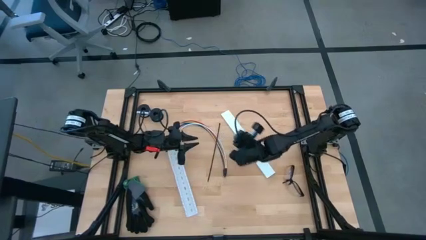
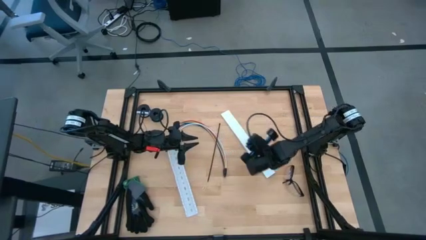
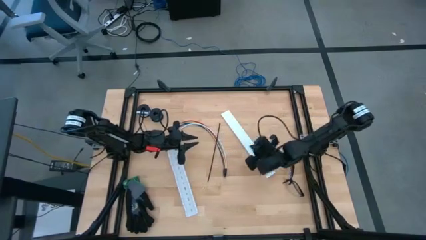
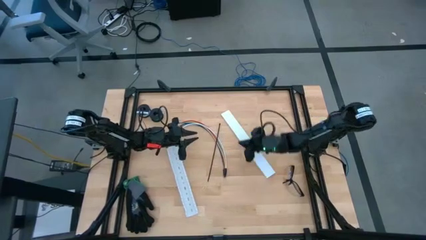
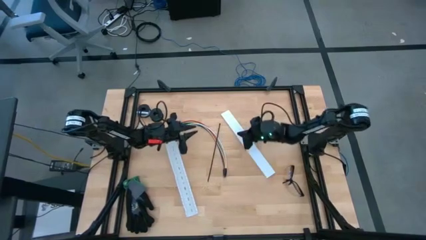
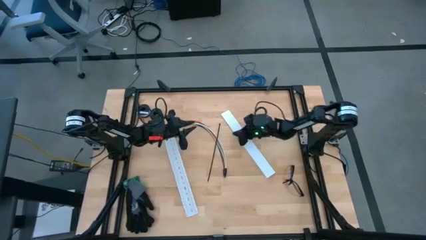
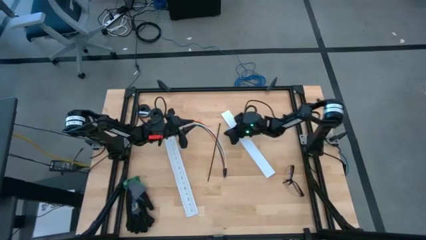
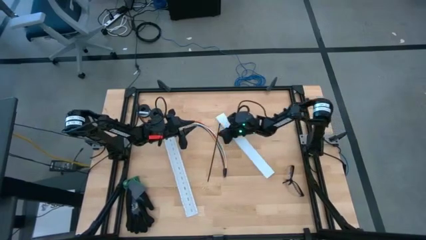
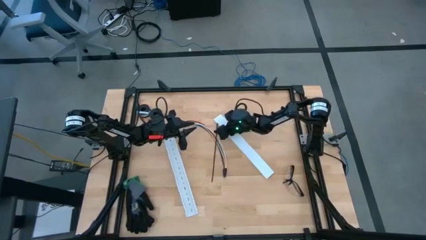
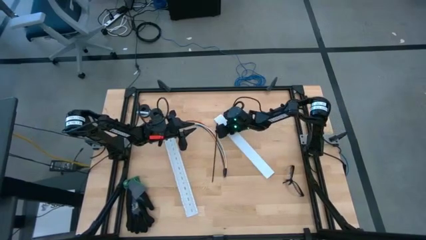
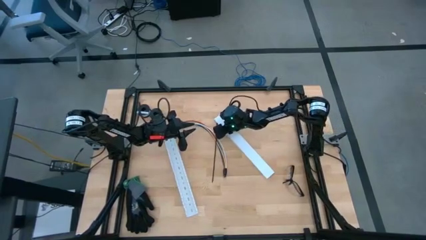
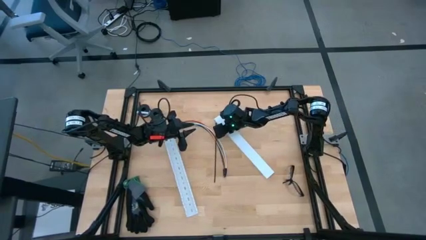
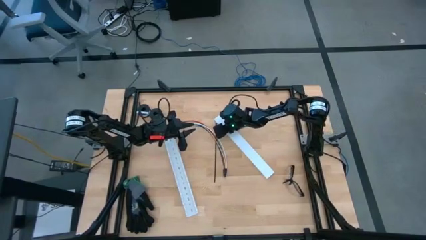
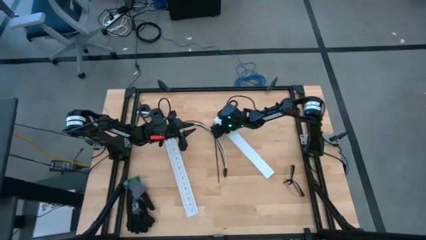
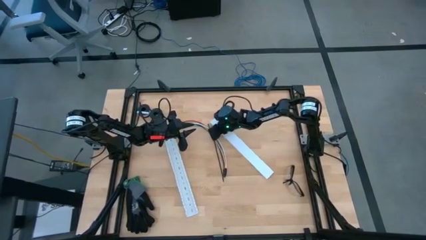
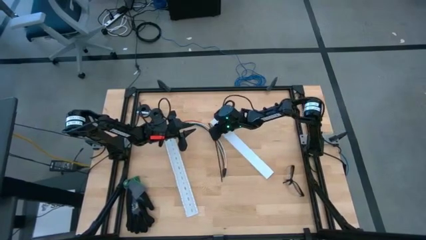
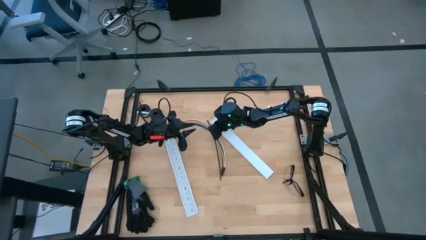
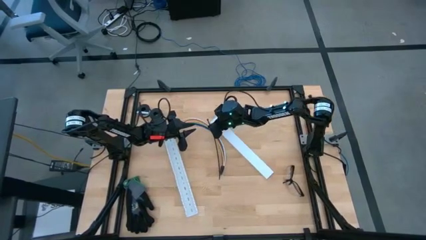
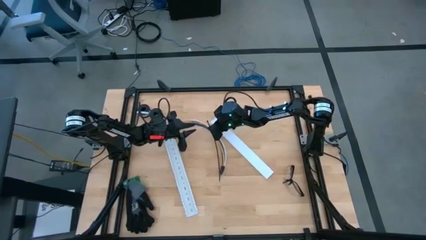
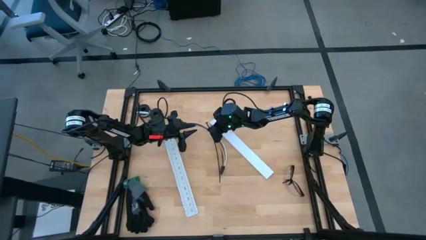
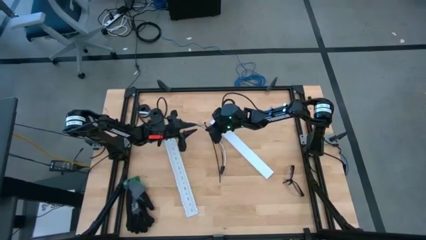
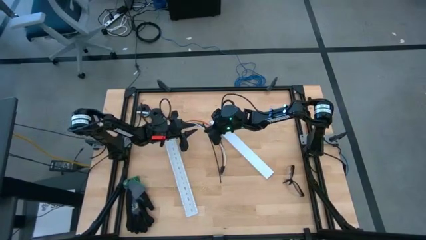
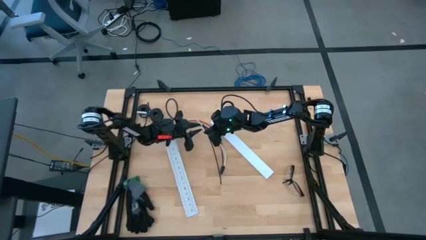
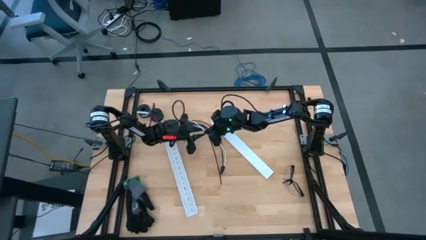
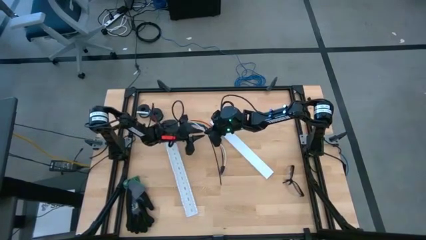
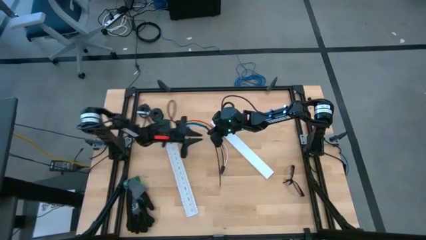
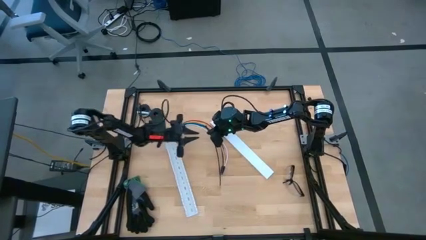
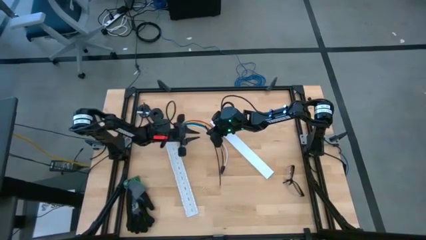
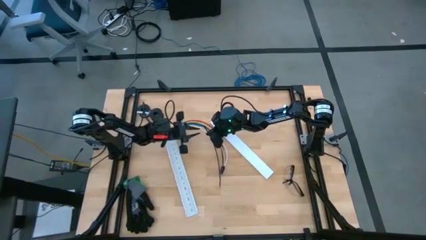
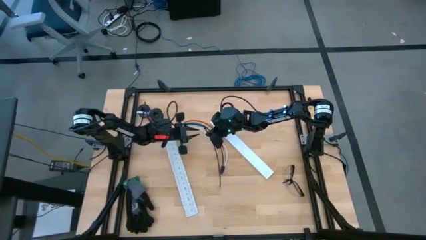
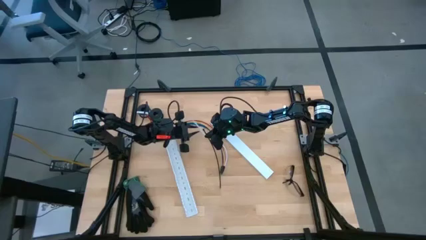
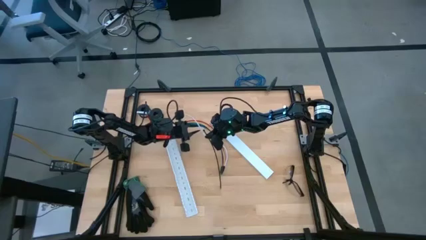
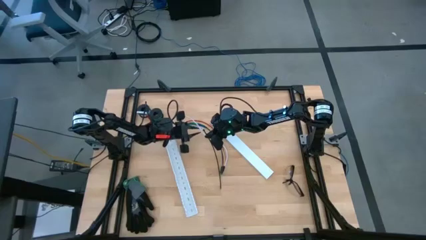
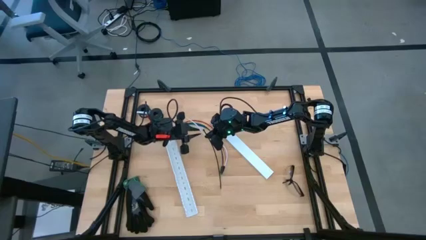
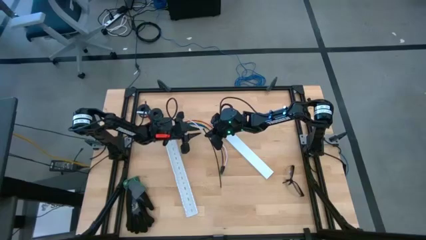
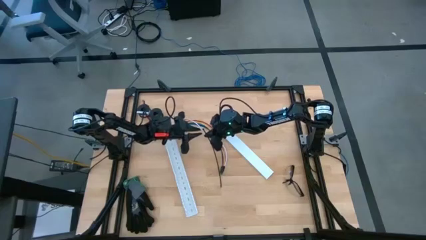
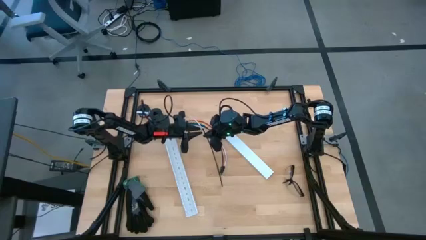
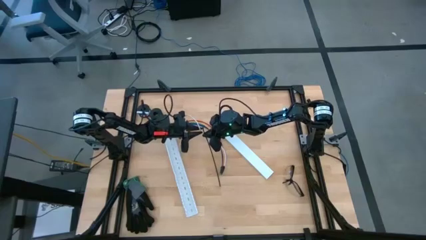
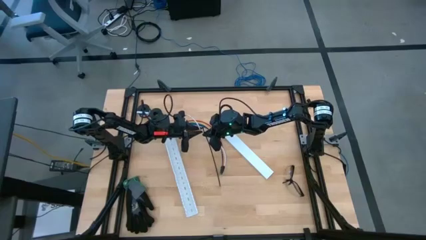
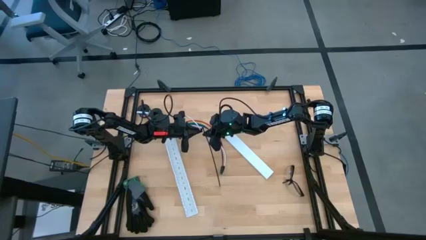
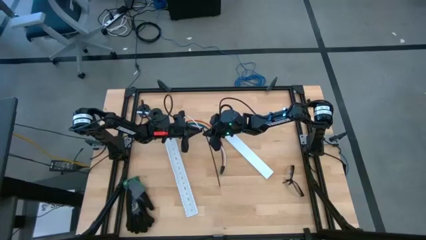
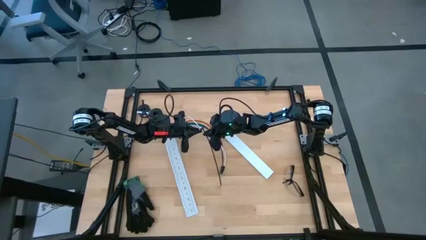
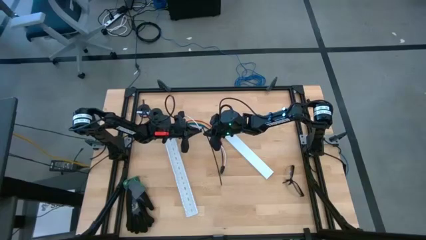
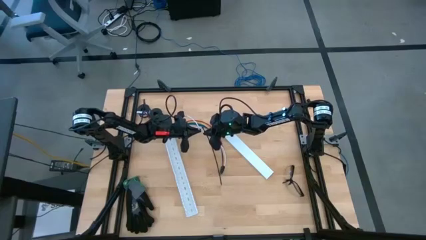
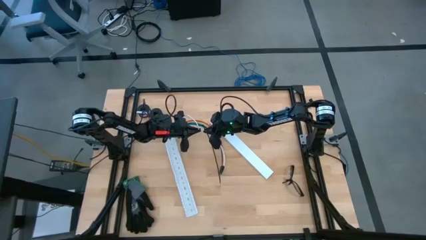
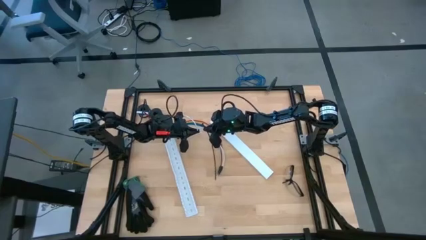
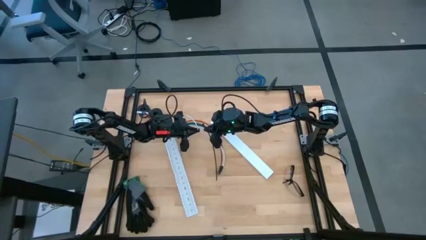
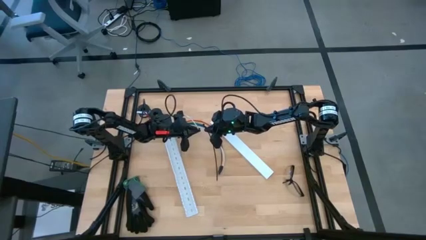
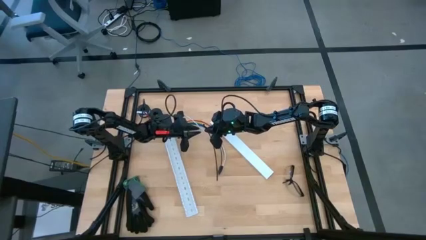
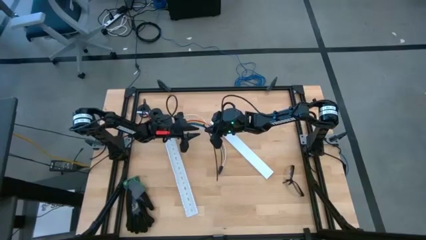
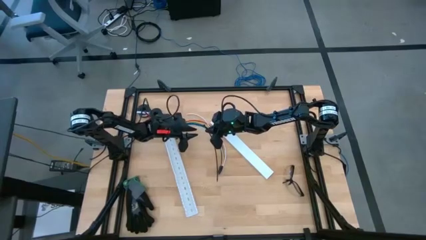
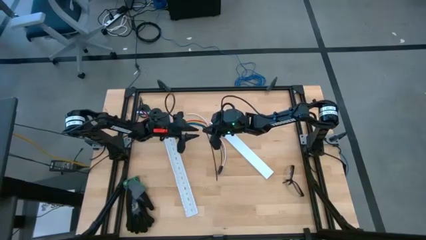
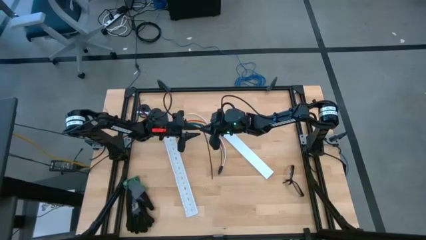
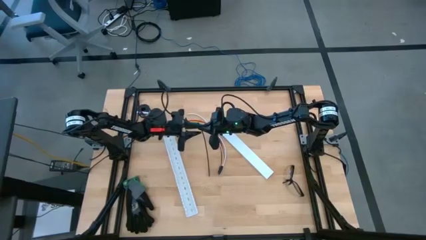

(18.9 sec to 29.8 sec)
Task: Ziptie cables
Wrap the cables together using the black zip tie

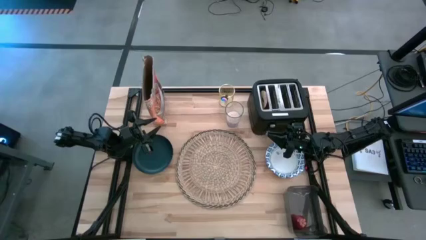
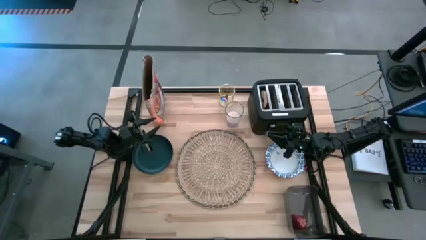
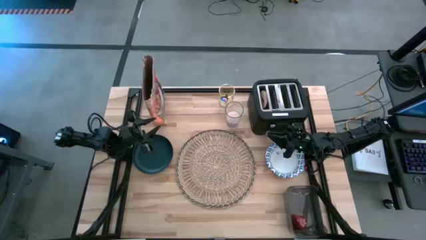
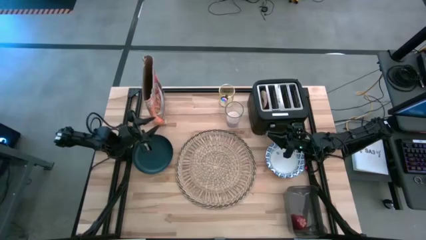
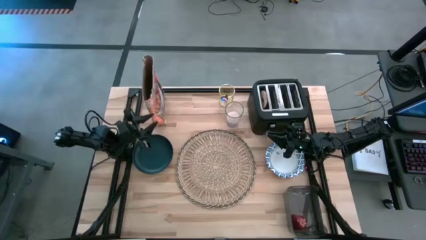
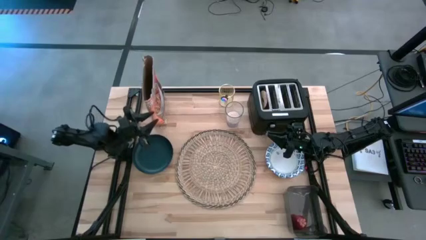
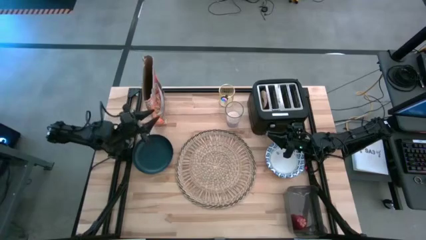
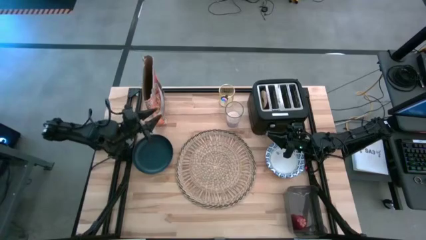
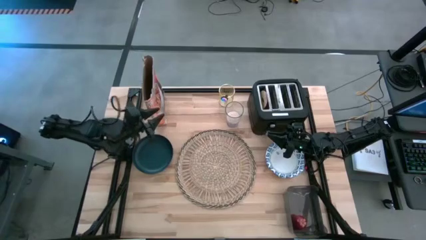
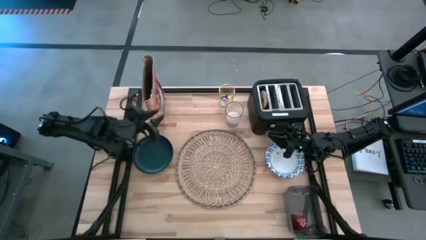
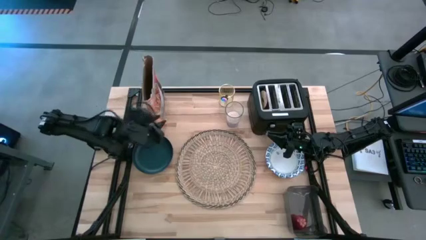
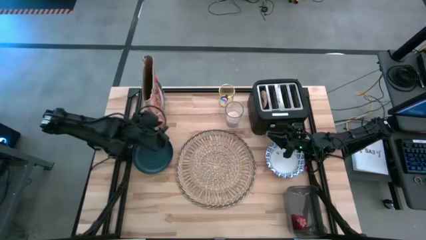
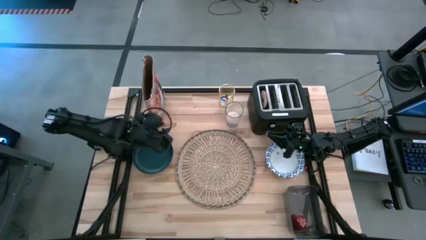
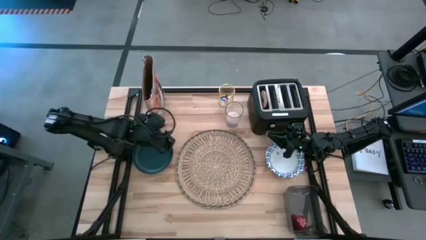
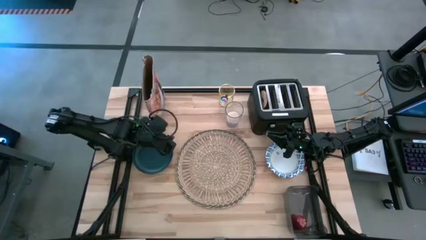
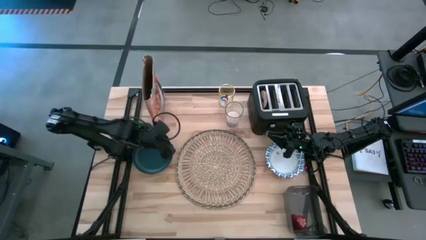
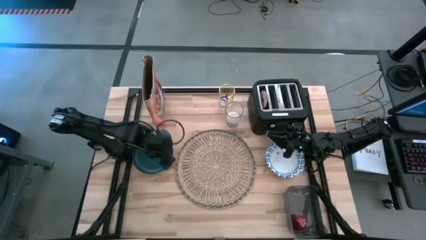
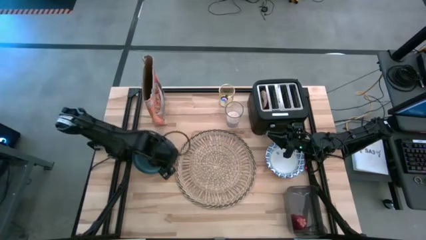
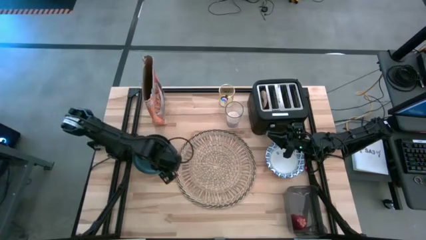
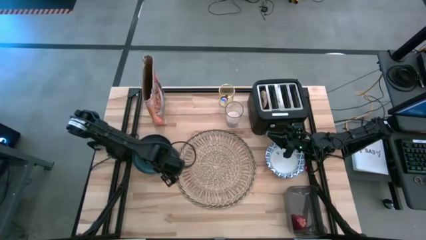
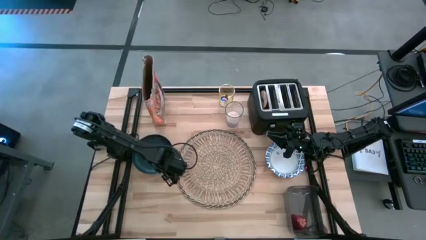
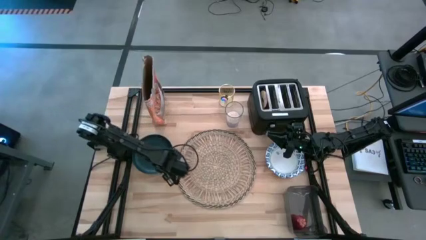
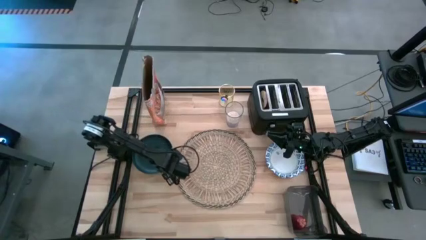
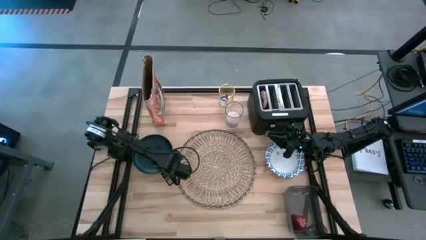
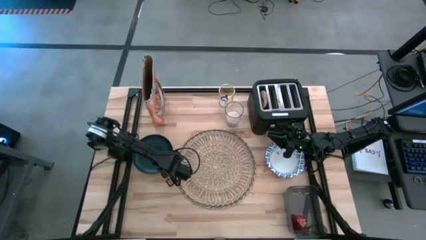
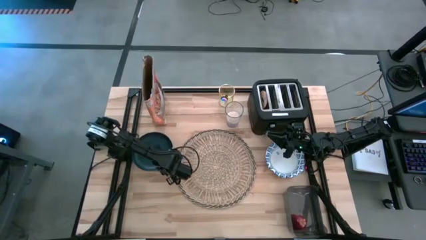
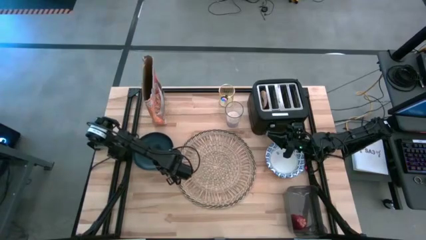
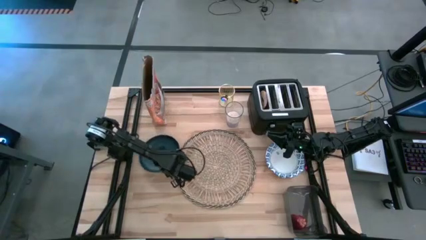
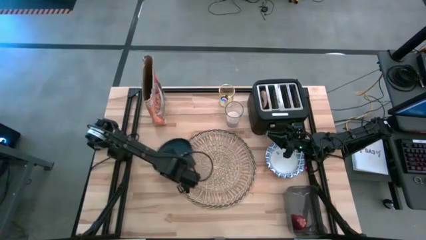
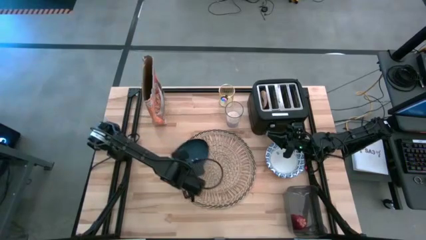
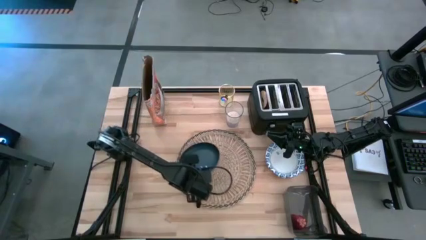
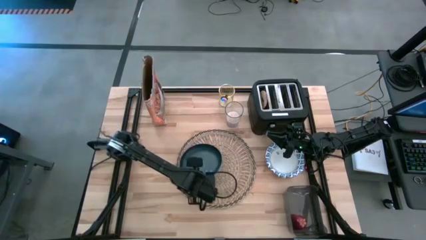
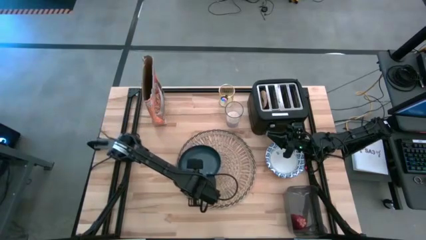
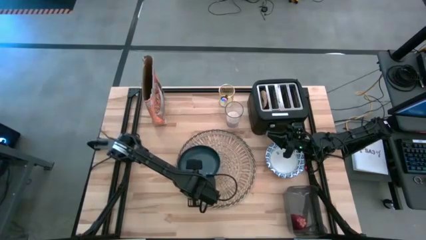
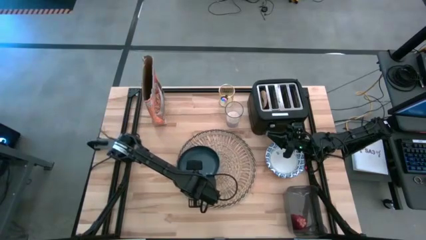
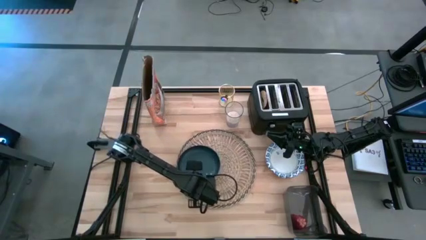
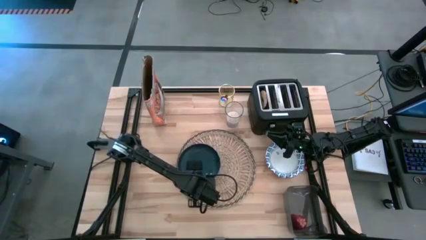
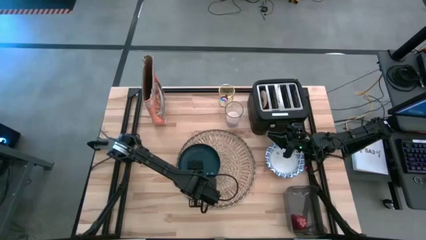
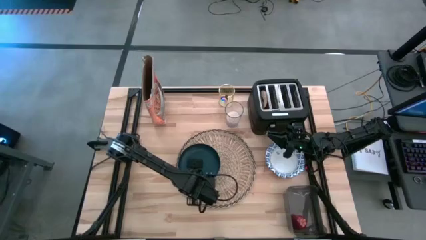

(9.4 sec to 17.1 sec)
Task: Arrange a breakfast setting
Put the blue plate on the placemat
